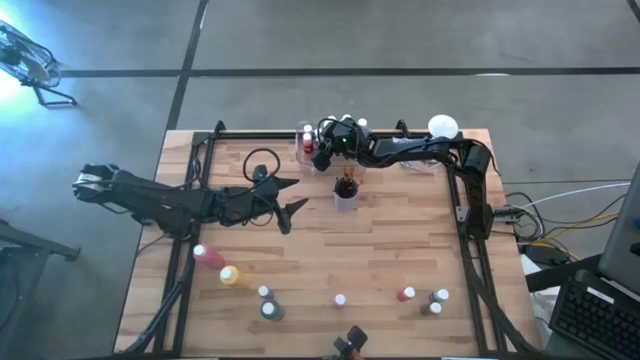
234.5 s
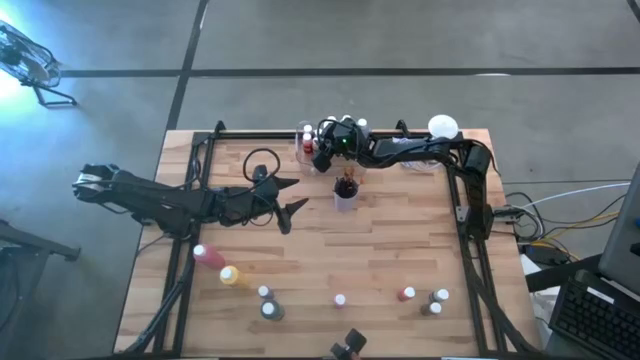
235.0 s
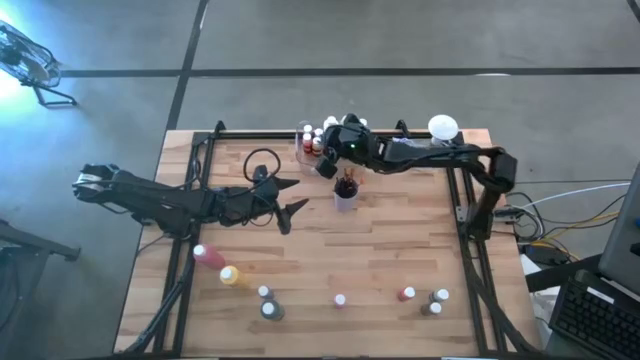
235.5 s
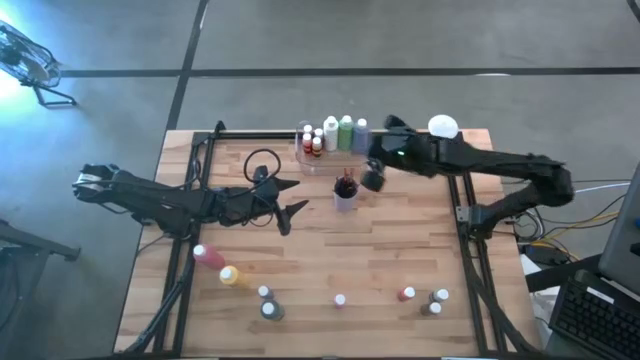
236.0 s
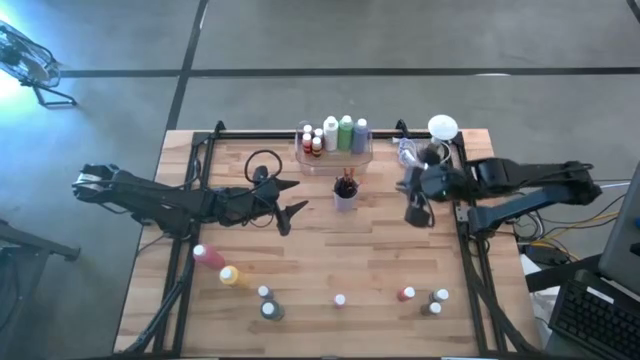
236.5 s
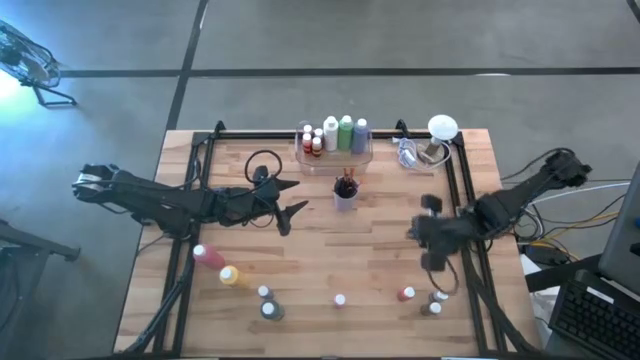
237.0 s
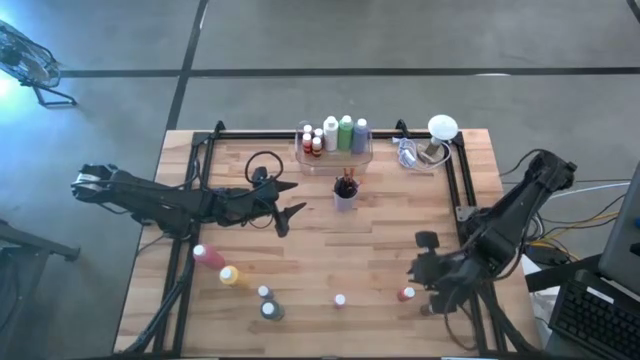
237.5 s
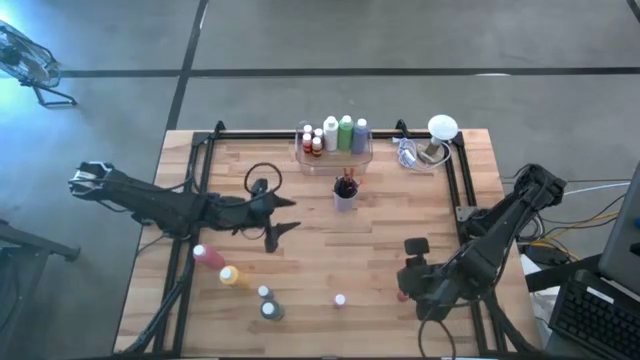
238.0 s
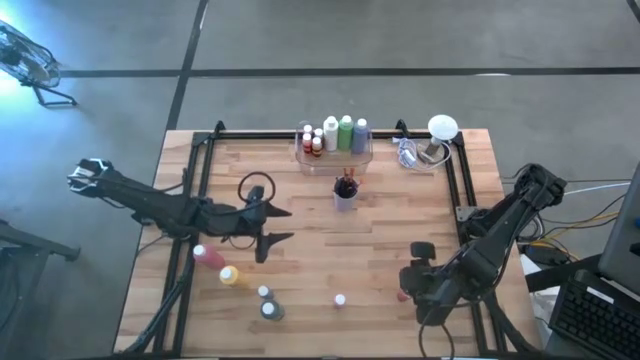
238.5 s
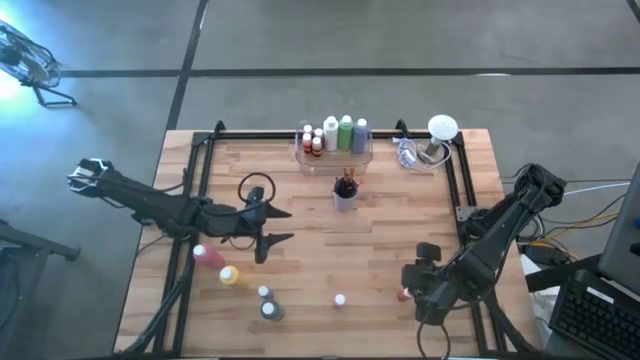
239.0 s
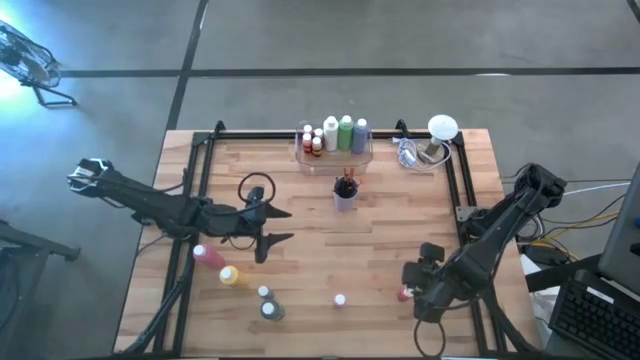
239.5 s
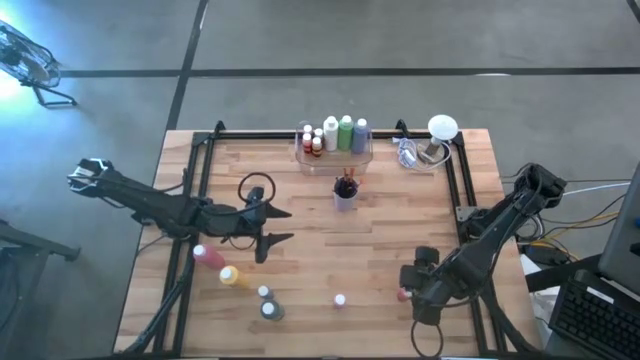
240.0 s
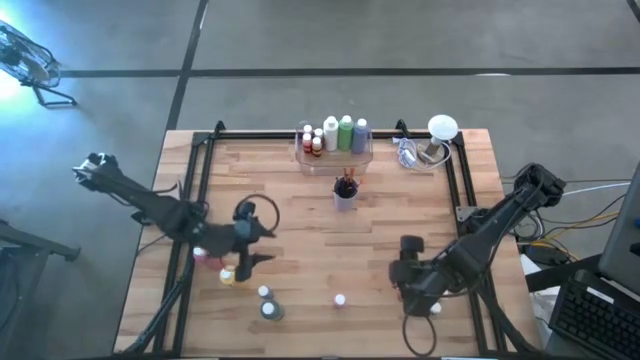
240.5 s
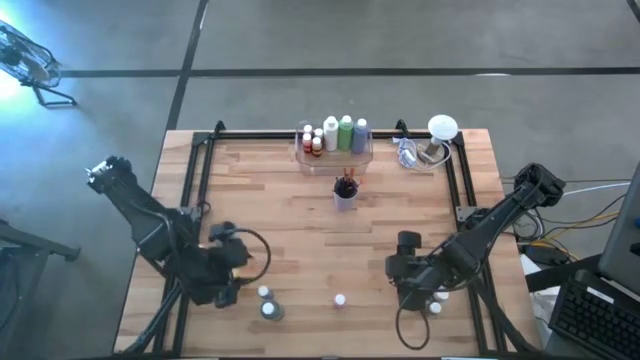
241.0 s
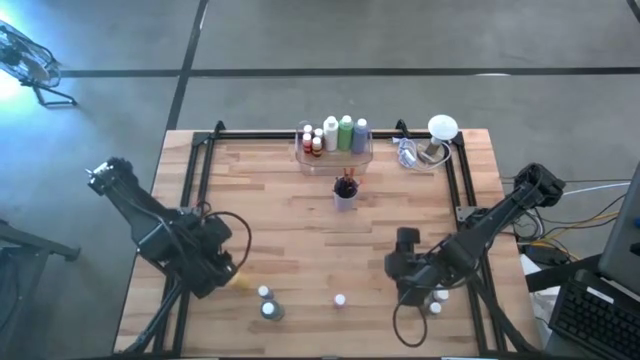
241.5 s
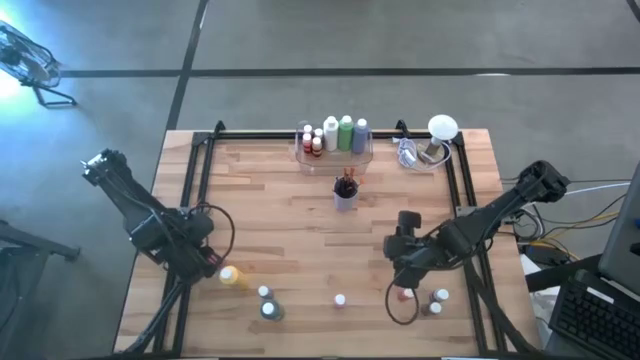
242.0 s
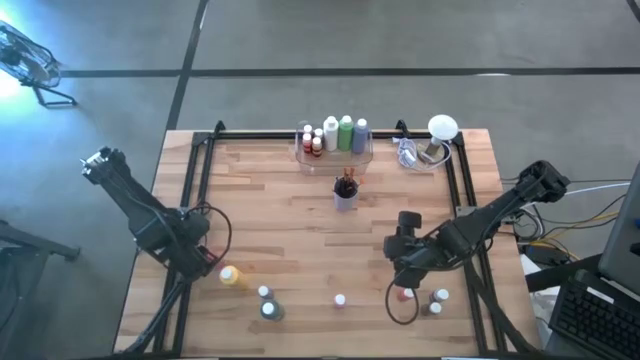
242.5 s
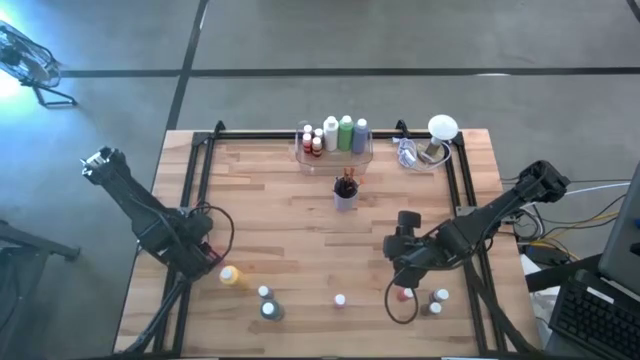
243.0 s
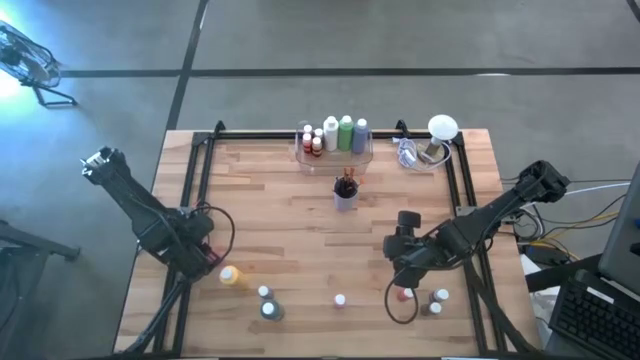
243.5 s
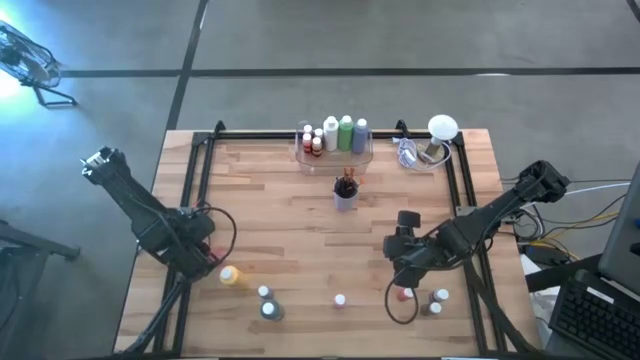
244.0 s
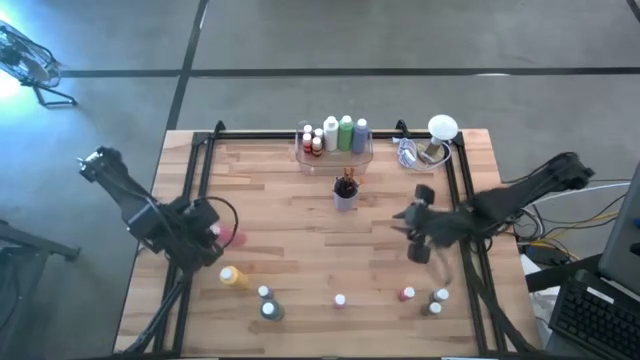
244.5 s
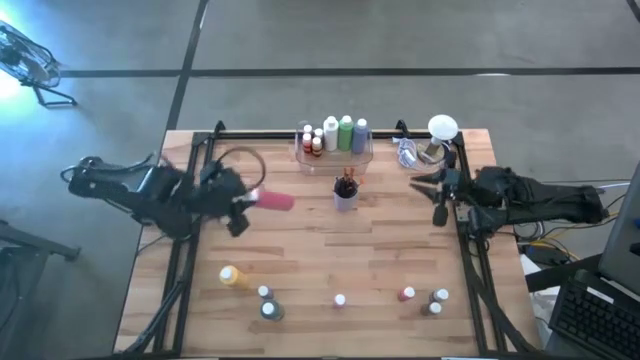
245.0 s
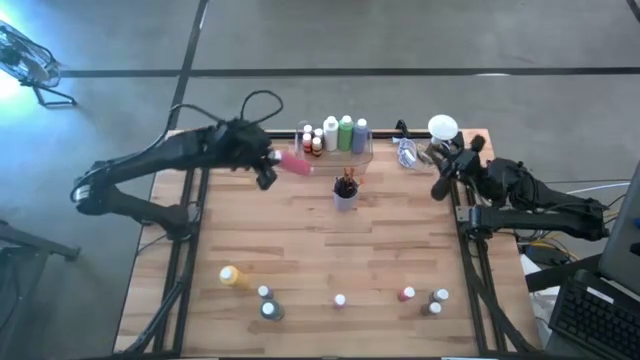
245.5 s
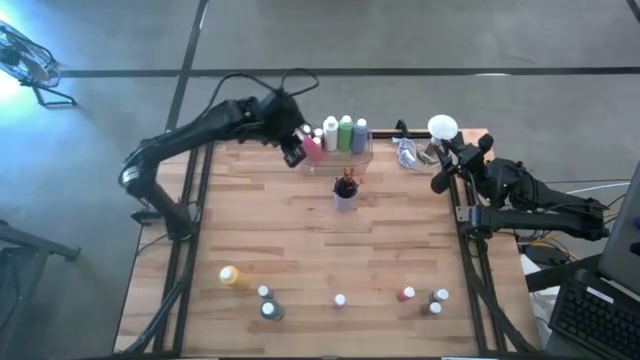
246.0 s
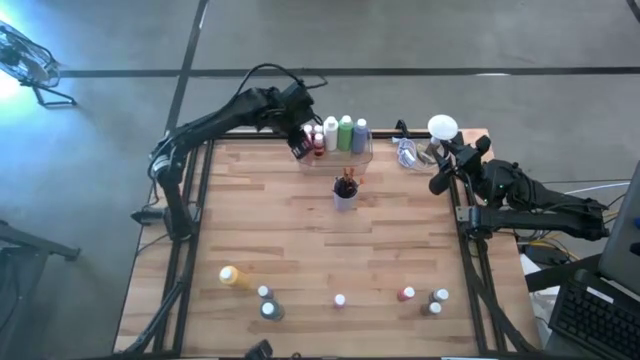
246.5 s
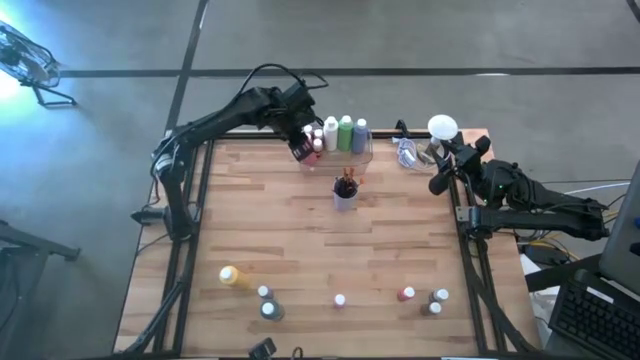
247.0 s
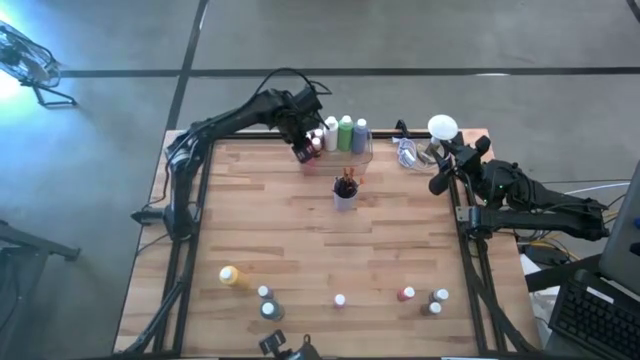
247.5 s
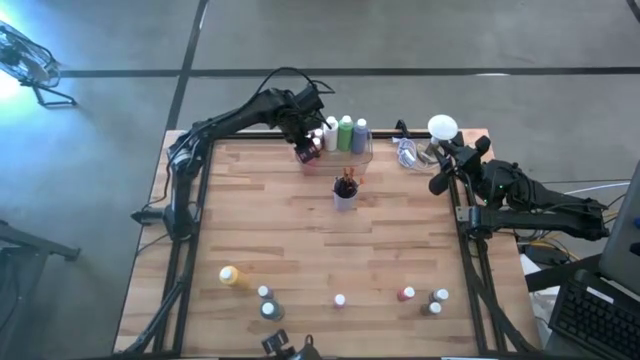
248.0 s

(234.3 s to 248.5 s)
Task: Pick & Place Paint Supplies
Put the pink paint bottle into the transparent bin

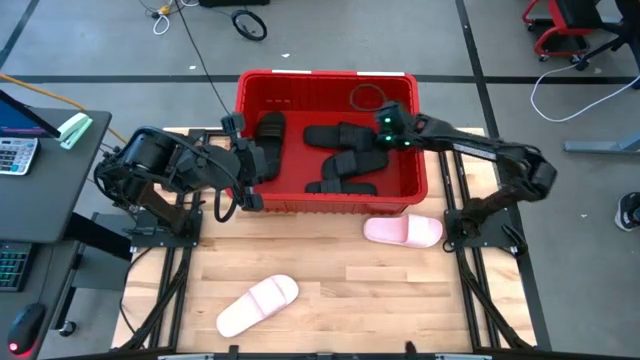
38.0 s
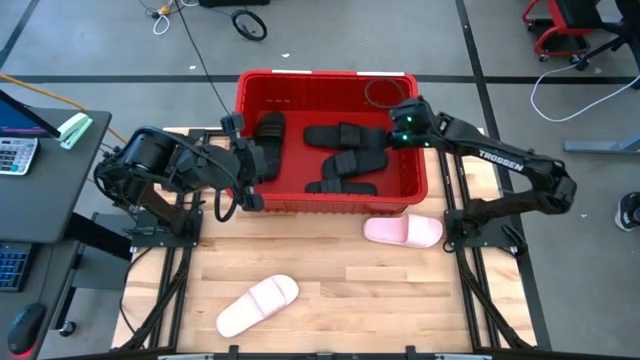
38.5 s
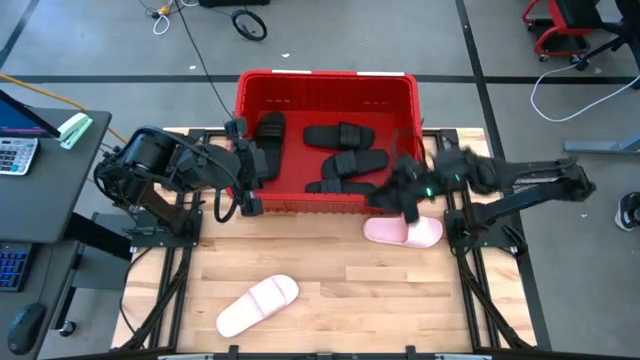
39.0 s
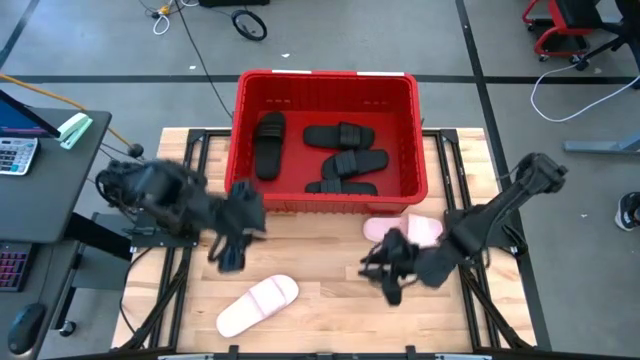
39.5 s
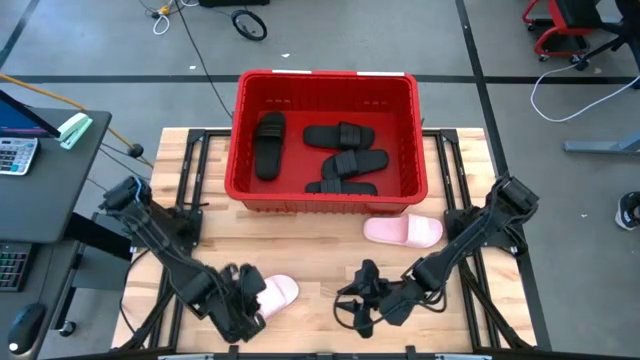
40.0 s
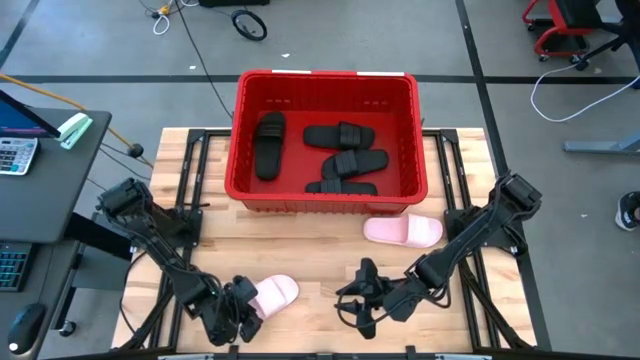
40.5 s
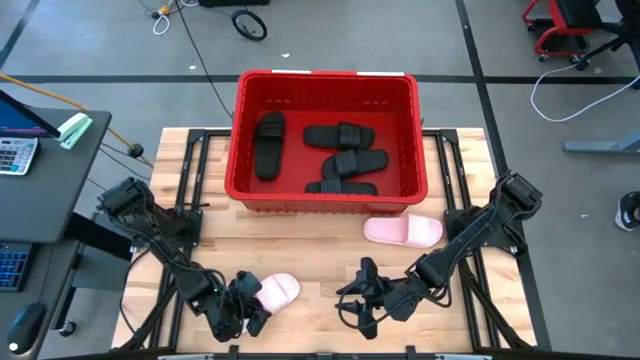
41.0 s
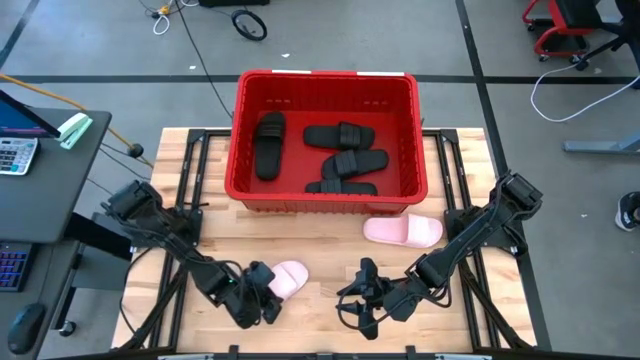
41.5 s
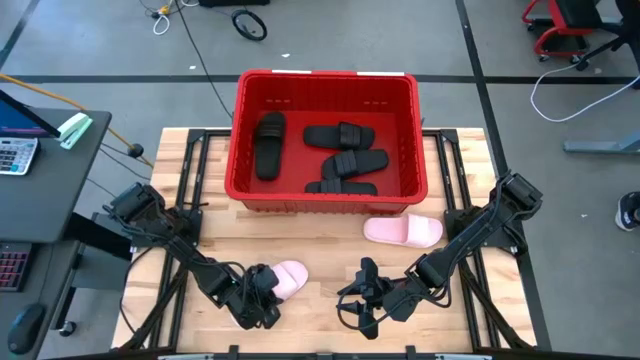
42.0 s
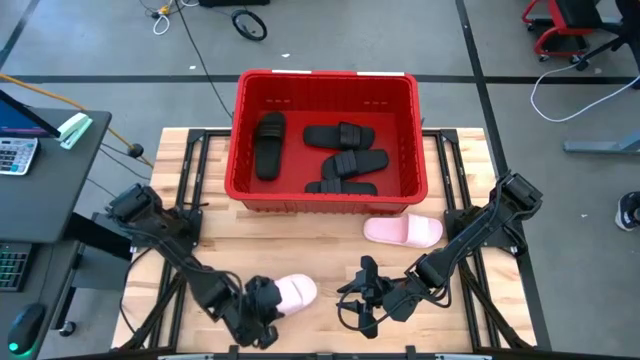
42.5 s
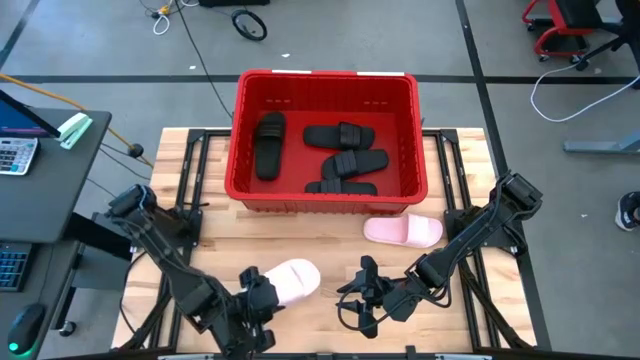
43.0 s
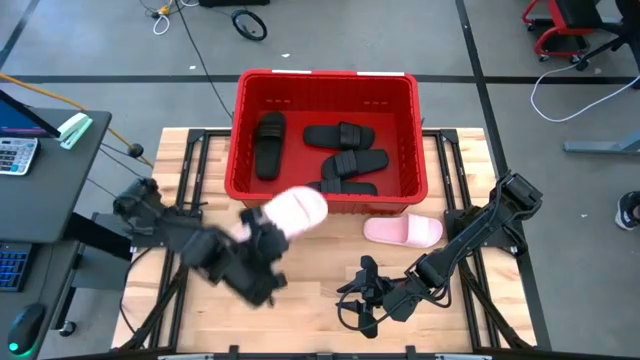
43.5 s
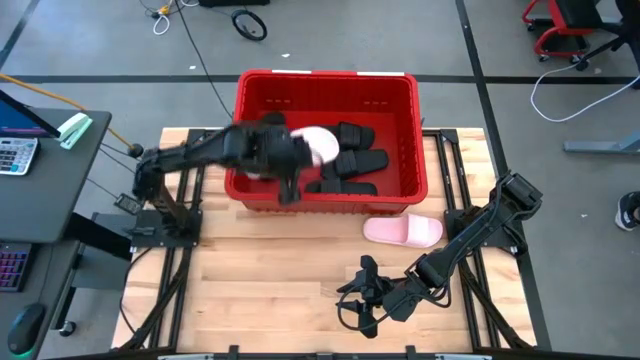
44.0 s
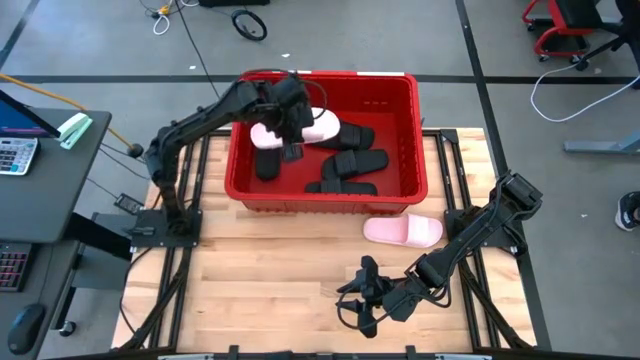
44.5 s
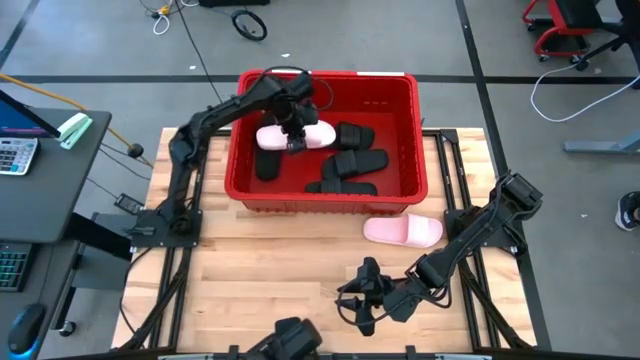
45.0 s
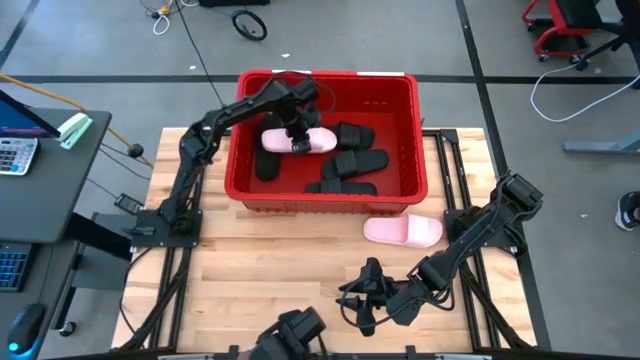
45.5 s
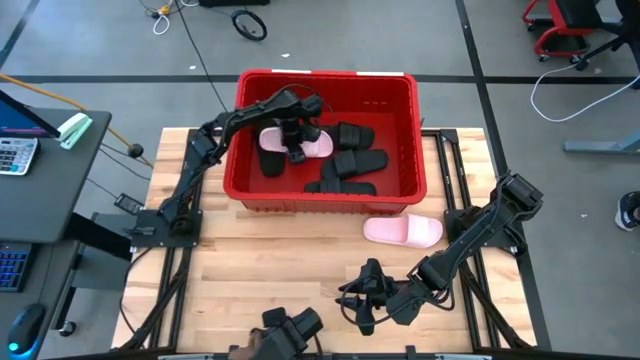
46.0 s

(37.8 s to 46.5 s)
Task: Pick and place slides into bin
Put the pink slipper into the red bin
